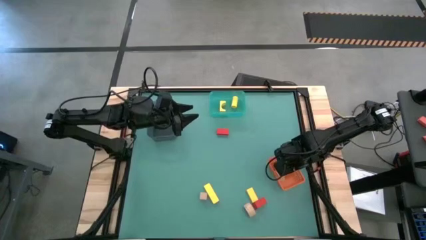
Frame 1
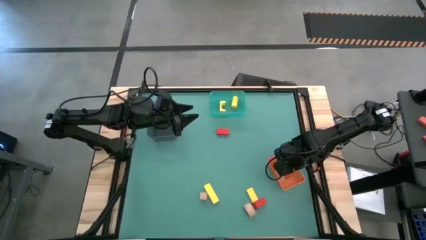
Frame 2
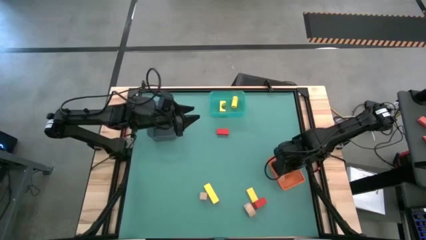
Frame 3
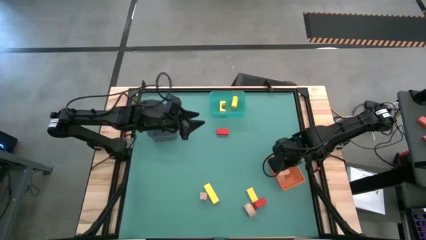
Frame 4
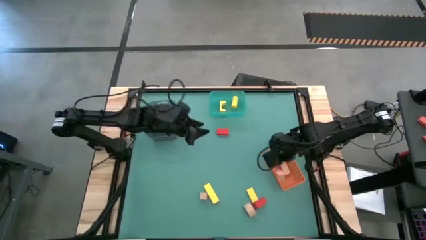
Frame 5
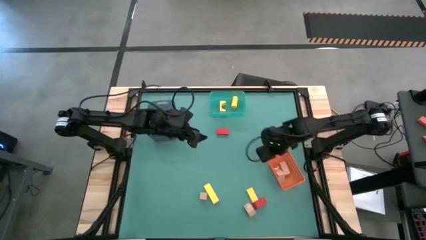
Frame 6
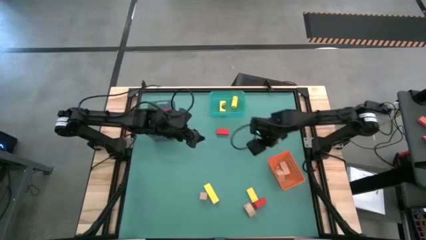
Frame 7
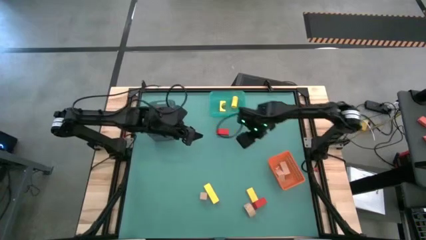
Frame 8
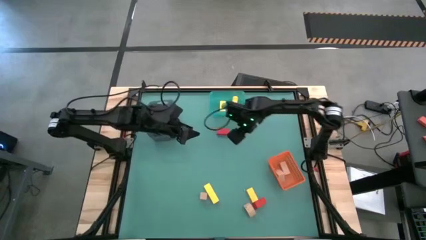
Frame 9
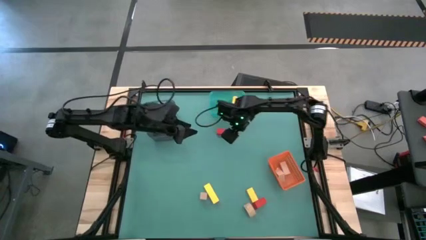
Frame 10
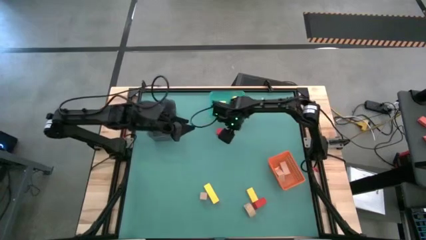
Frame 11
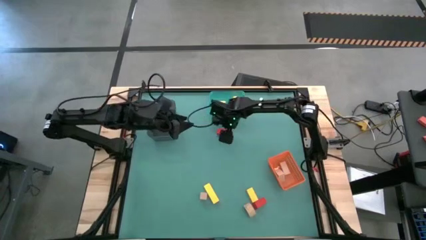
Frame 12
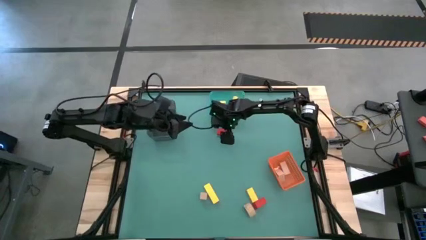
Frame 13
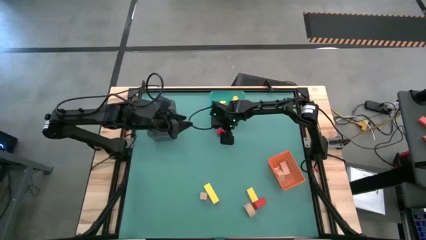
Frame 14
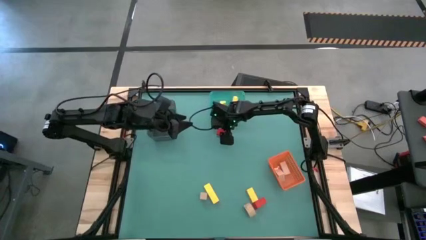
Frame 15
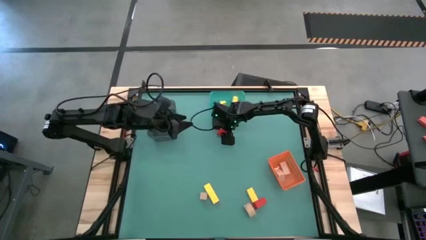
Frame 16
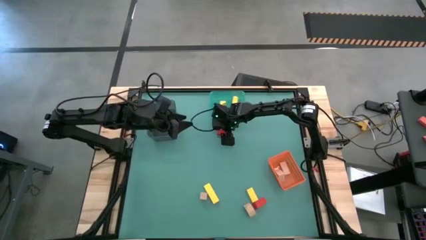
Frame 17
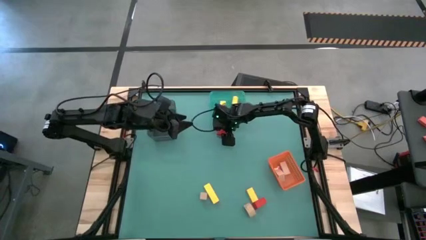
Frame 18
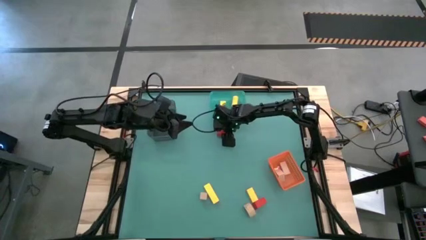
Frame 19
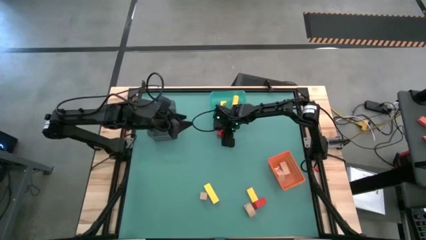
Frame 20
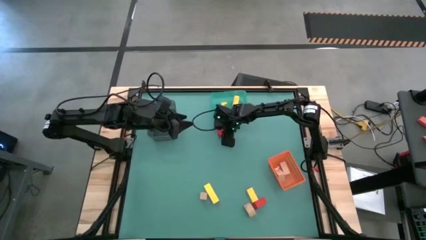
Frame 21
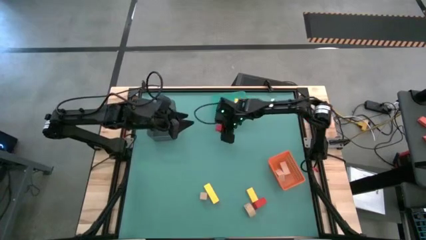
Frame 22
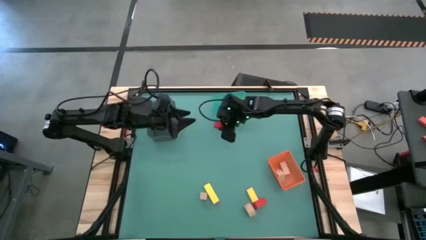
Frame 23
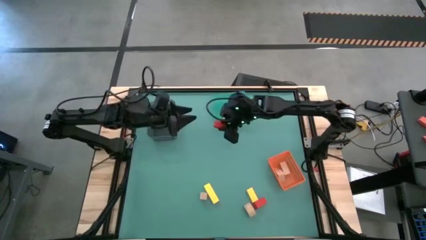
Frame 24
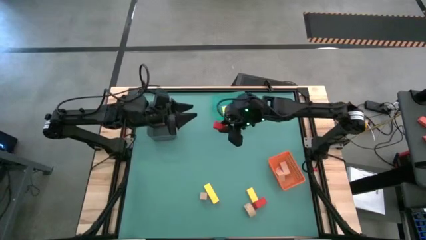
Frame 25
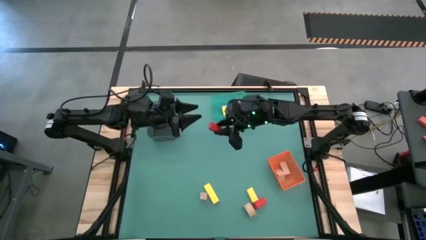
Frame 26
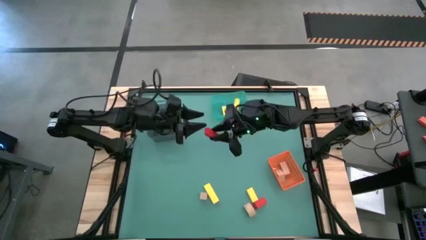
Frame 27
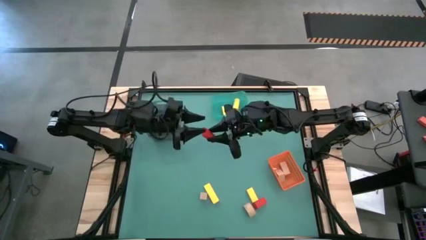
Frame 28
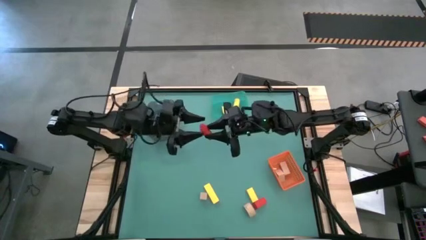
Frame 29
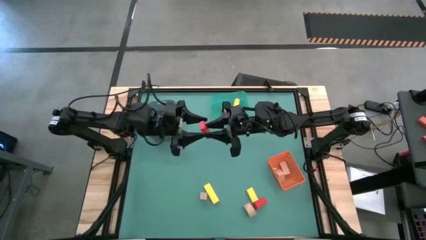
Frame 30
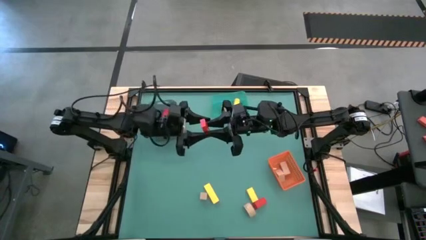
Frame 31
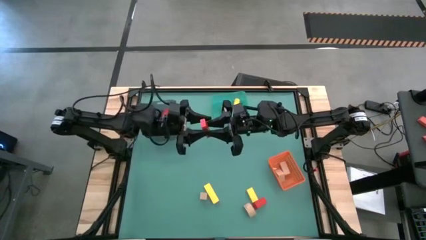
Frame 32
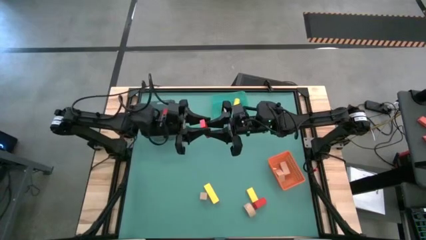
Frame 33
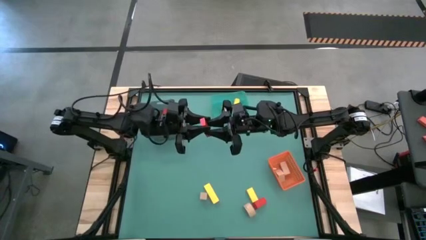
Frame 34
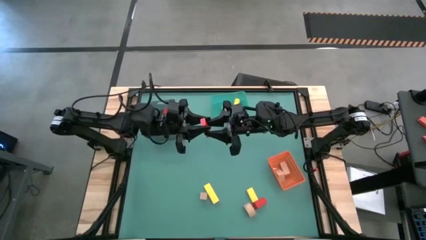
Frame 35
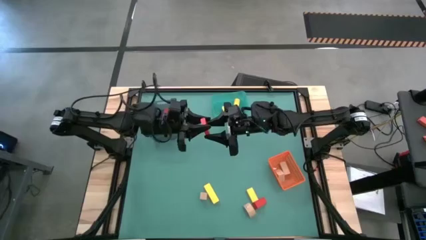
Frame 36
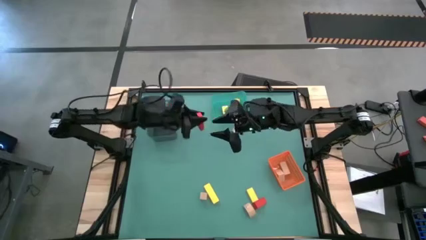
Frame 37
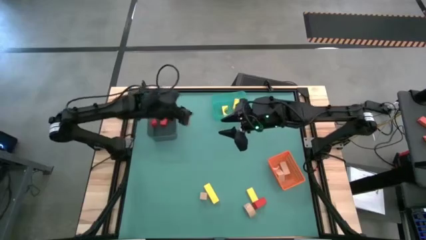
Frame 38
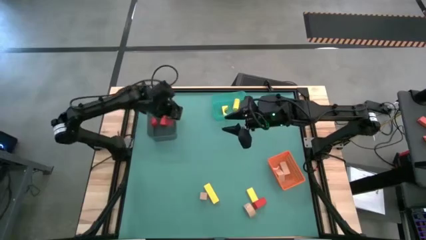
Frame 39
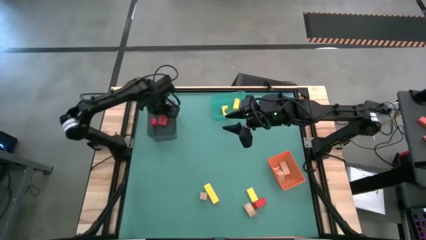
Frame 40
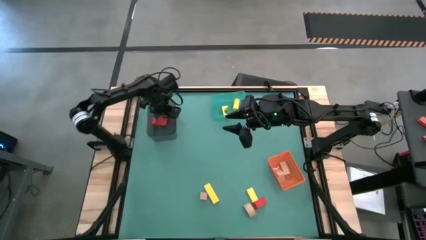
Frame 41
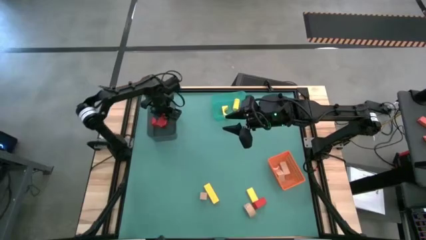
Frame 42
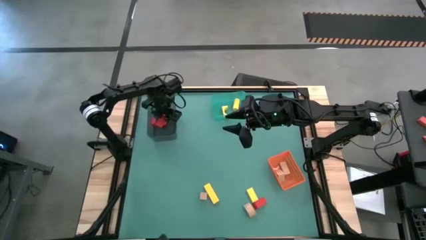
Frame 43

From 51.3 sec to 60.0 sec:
Task: Sort & place blocks by color
Put the red block into the black bin

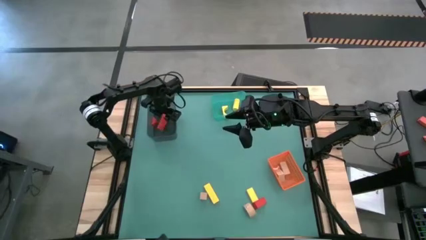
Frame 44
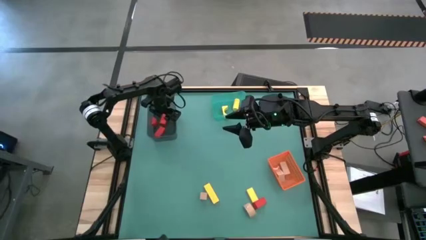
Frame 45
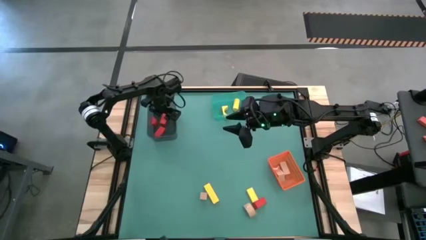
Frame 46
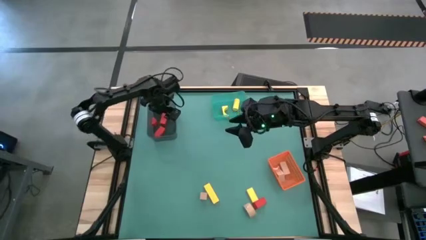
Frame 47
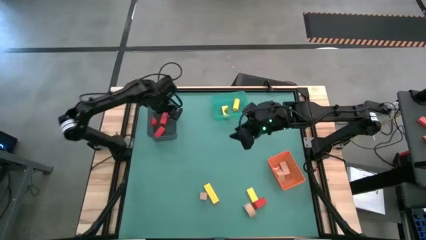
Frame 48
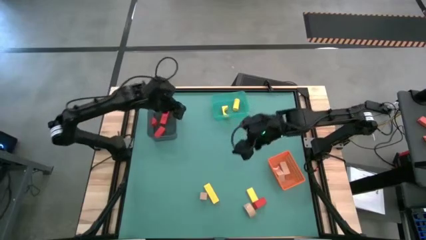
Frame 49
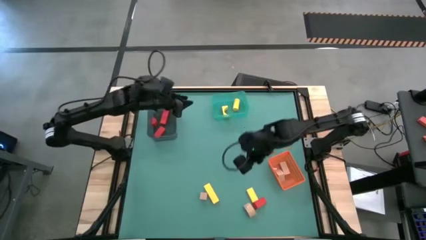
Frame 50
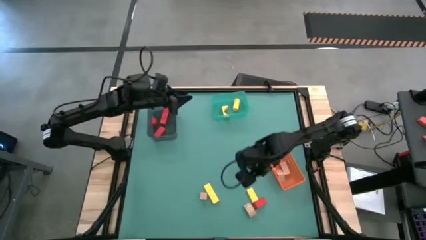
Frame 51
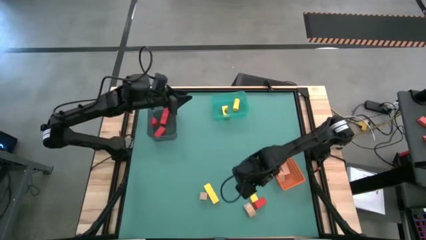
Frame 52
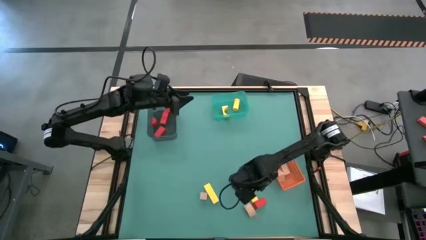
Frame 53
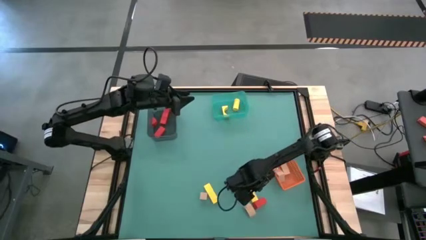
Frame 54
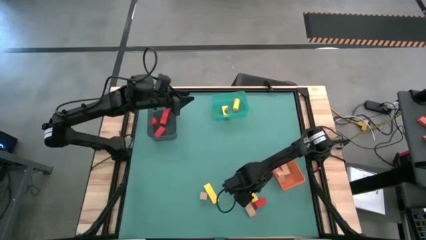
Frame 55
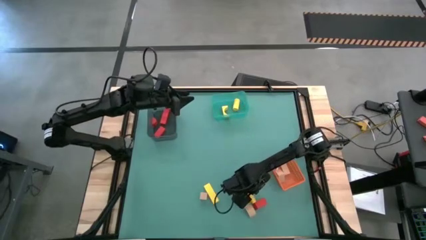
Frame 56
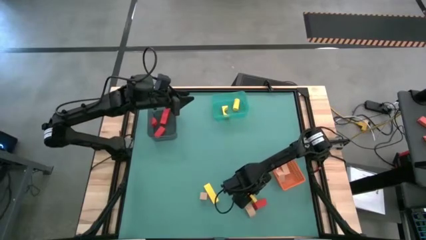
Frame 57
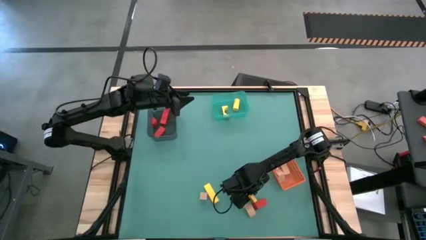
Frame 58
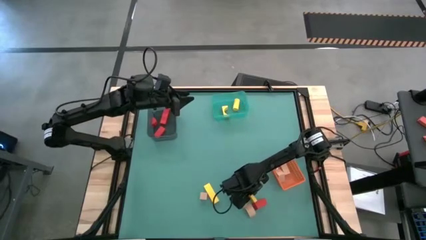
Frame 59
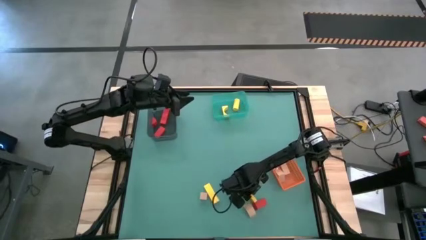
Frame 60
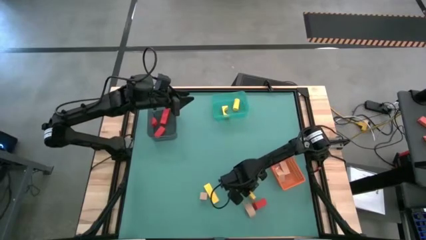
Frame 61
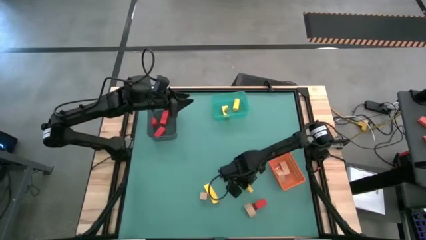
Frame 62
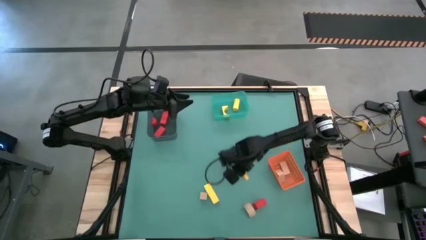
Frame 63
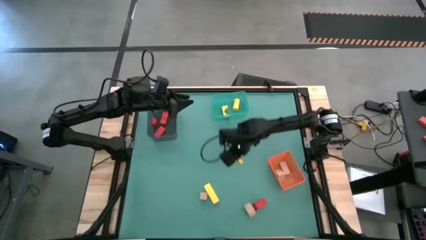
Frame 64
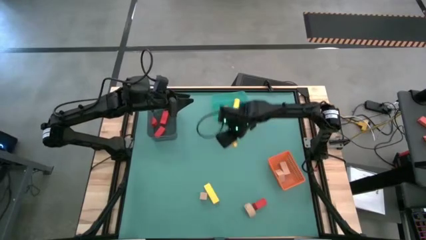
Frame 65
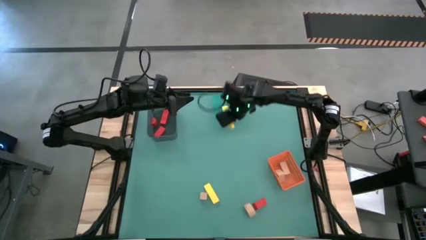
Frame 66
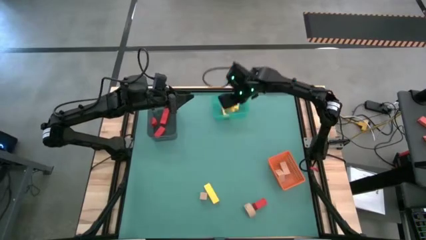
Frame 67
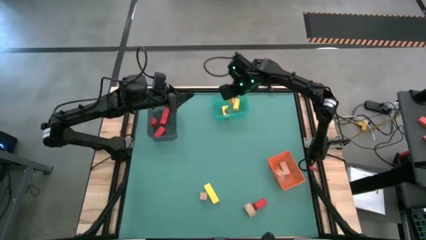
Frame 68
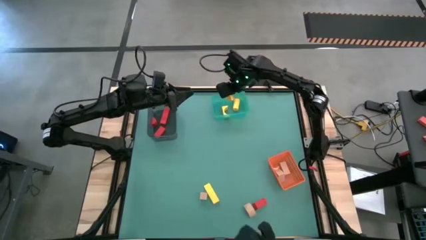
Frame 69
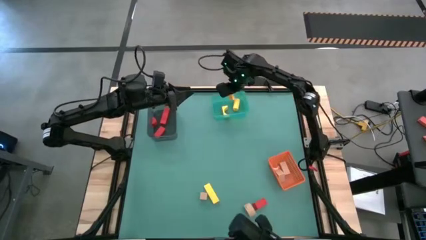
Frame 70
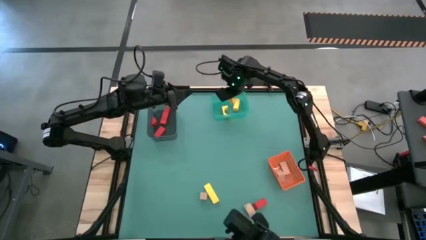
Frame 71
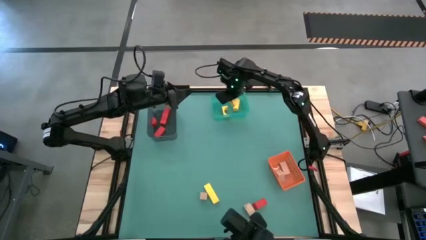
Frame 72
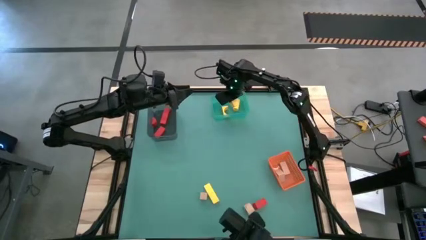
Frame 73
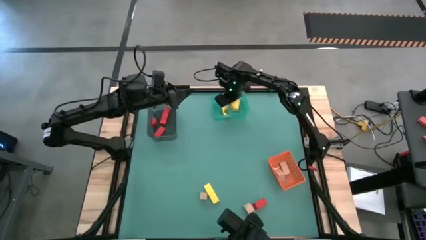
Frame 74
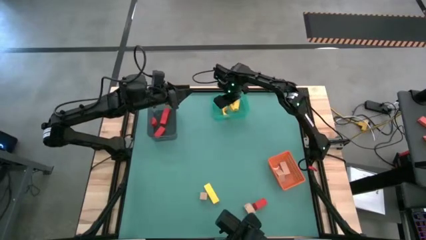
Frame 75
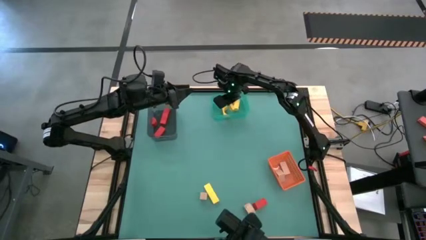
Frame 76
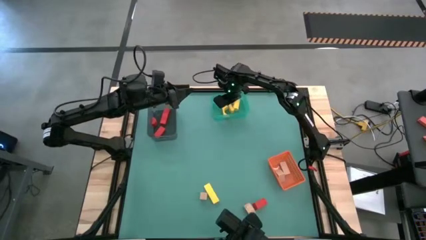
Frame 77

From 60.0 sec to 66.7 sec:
Put the yellow block into the green bin
